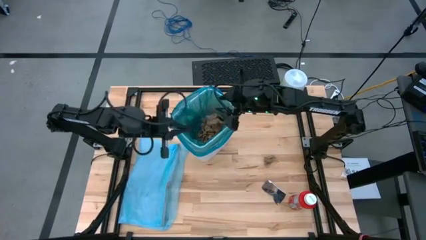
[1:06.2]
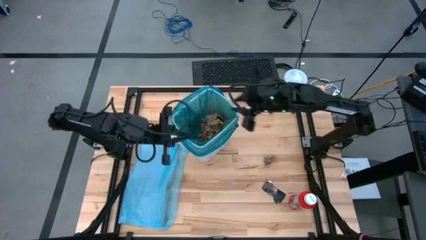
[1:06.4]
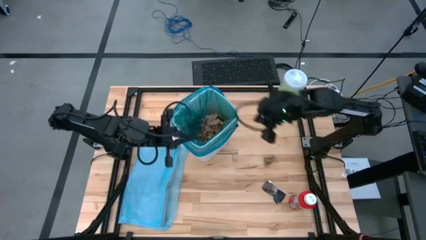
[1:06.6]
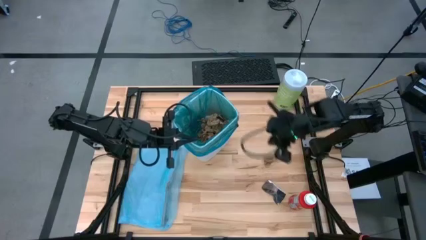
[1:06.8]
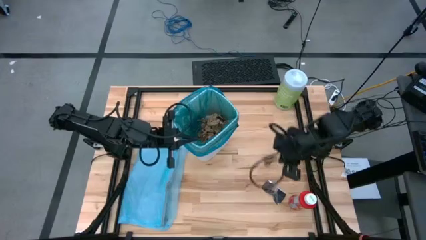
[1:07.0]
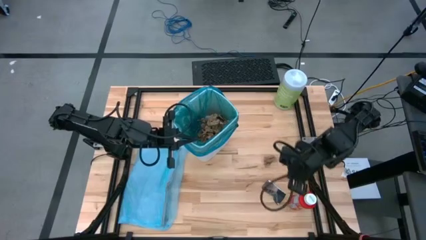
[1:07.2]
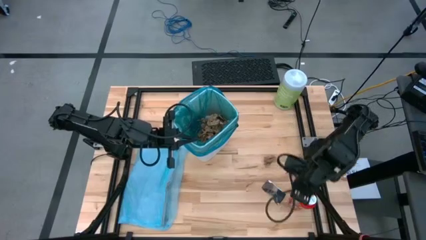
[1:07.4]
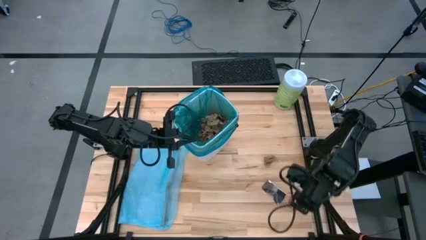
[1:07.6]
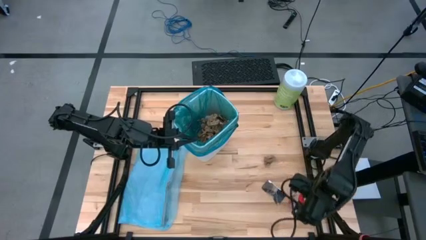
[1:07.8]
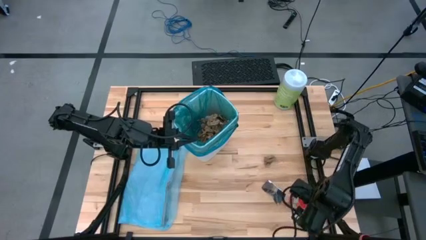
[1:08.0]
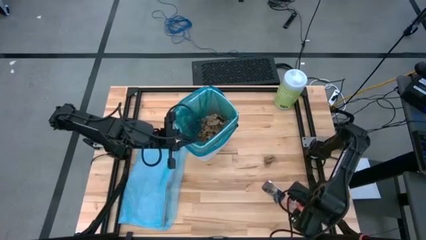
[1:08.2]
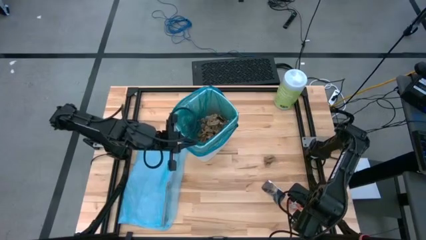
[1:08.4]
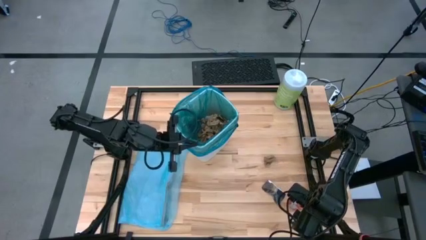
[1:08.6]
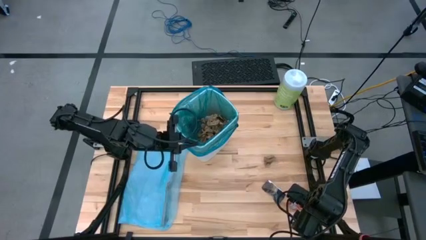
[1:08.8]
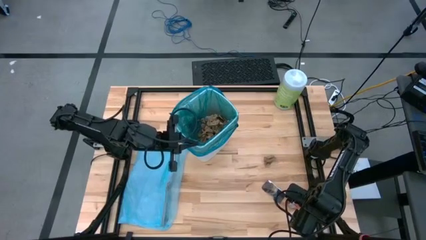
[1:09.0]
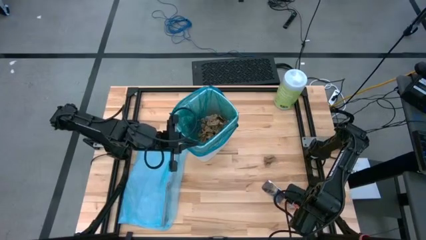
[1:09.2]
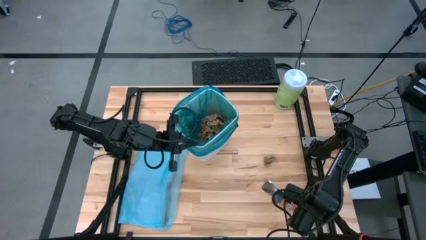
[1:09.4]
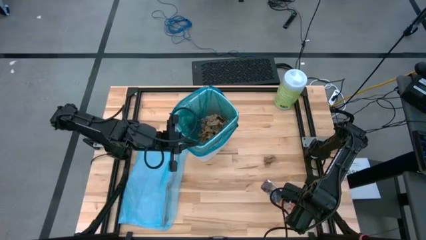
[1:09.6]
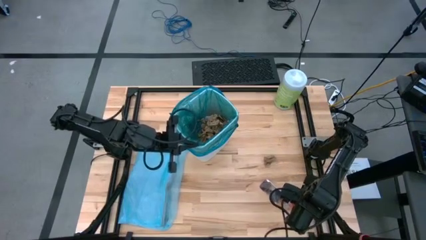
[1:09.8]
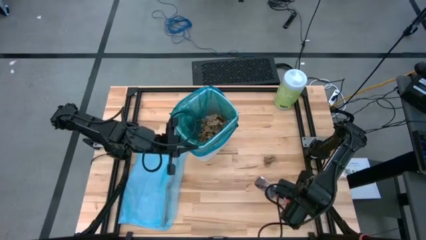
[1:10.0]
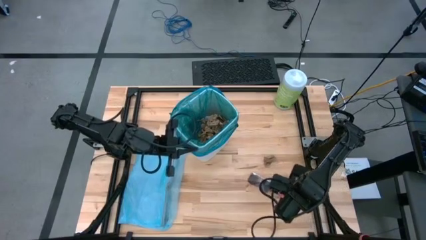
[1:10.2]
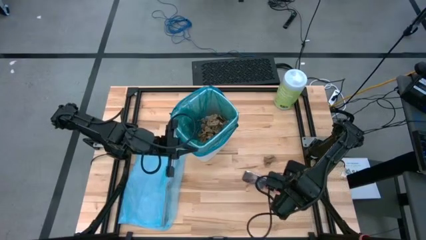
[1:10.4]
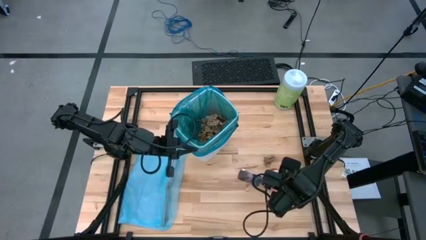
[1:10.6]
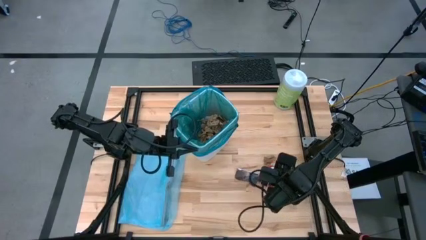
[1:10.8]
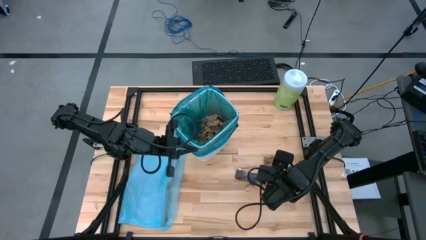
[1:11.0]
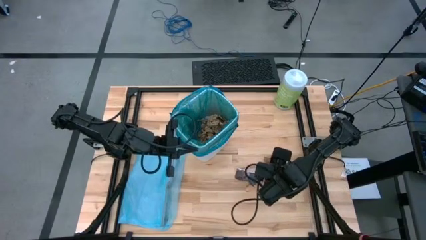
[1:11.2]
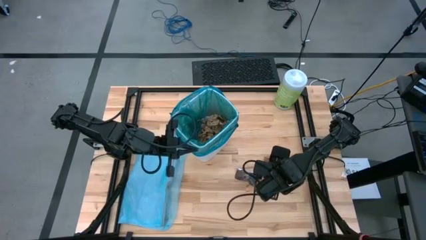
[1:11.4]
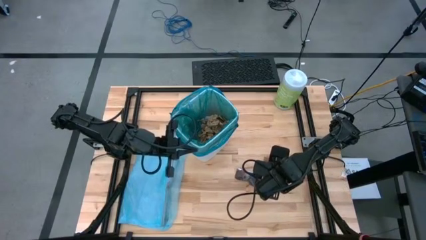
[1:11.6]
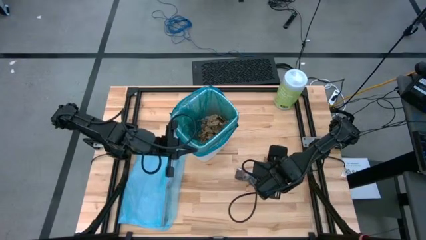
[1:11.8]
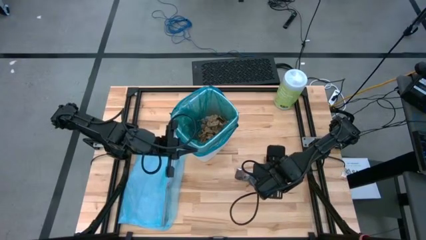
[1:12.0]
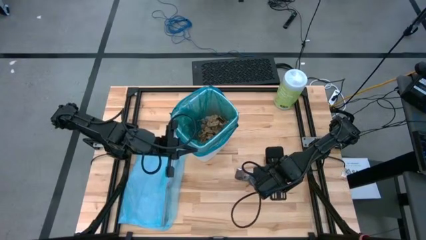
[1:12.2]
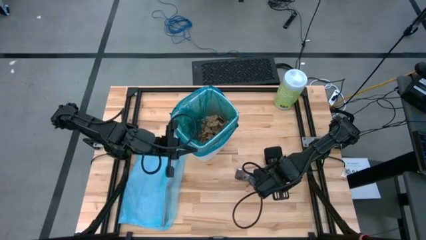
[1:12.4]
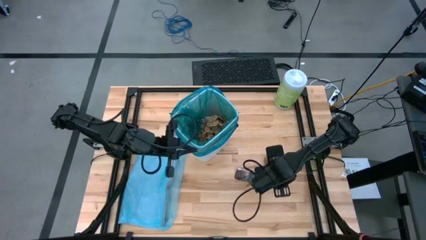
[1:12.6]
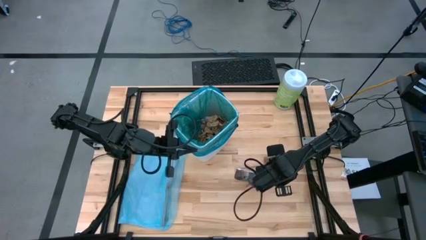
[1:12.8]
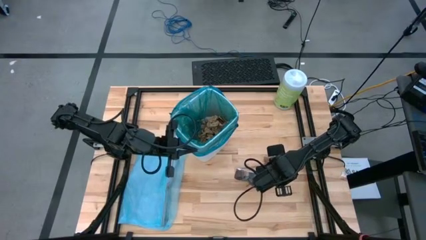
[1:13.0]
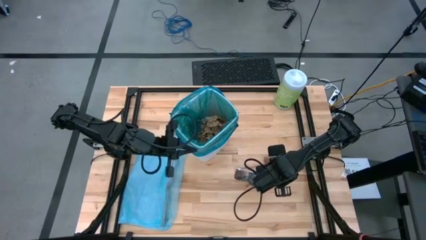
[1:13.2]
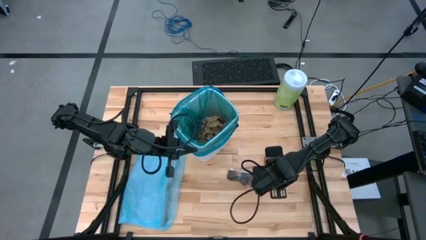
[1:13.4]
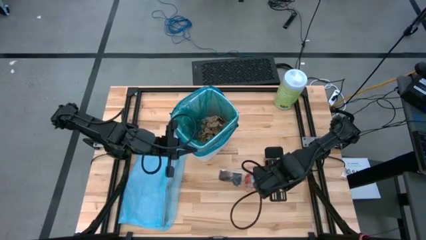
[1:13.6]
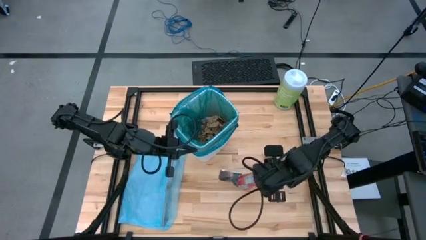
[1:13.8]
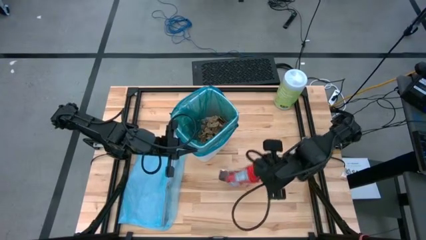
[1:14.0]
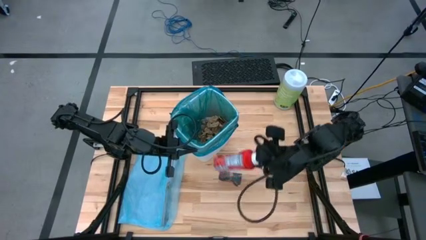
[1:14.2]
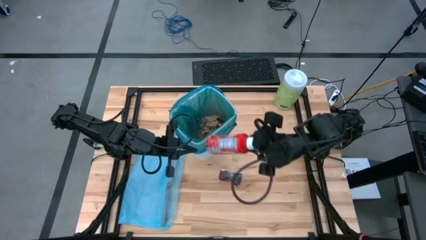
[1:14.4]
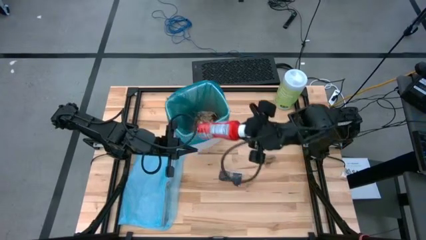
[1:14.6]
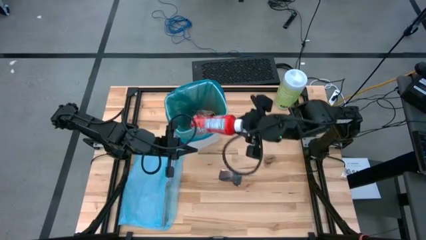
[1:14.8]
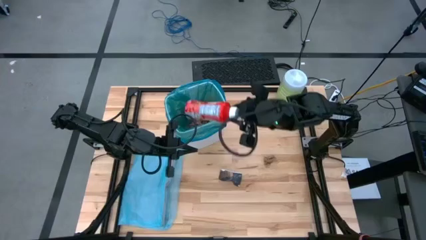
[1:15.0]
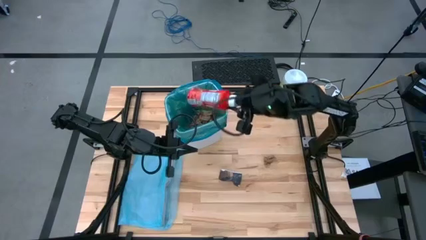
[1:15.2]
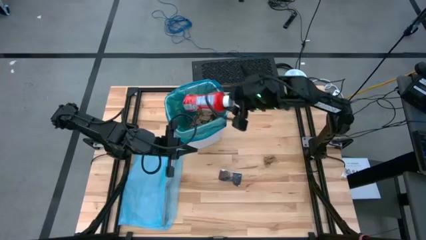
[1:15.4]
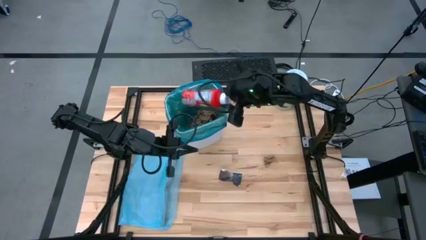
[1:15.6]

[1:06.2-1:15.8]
Task: place trash/remove bag and relplace
Put the red plastic bottle into the blue trash bag inside the white trash bin

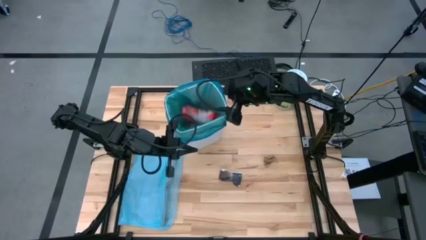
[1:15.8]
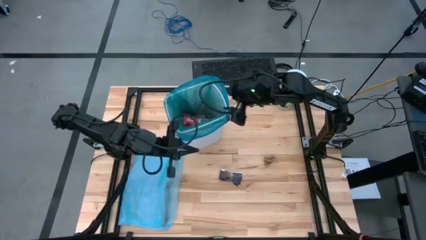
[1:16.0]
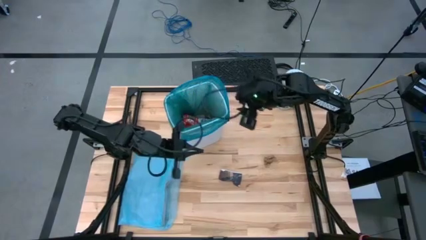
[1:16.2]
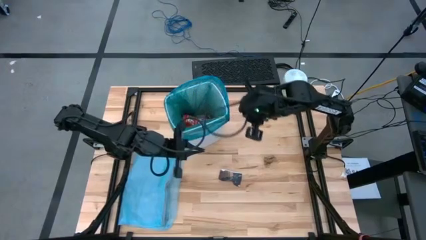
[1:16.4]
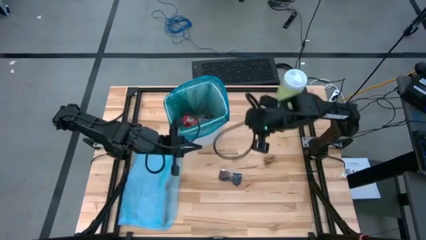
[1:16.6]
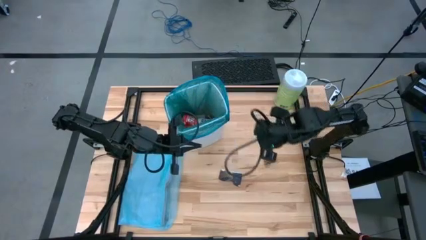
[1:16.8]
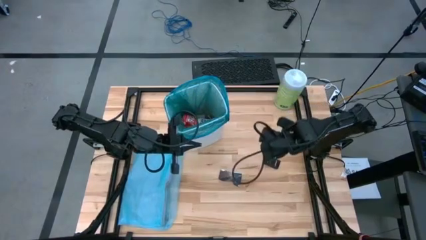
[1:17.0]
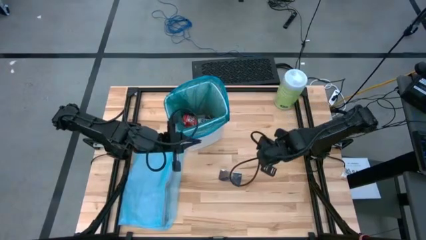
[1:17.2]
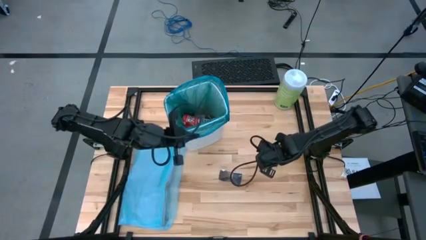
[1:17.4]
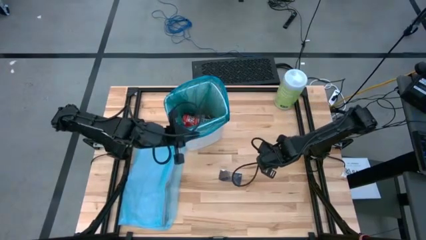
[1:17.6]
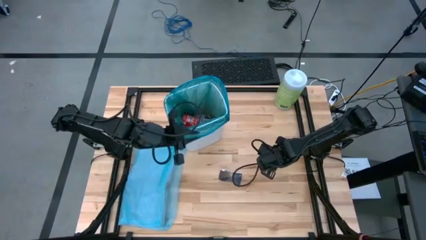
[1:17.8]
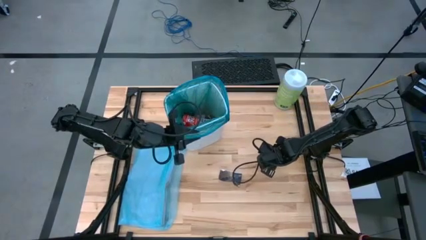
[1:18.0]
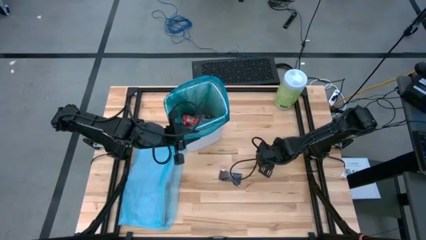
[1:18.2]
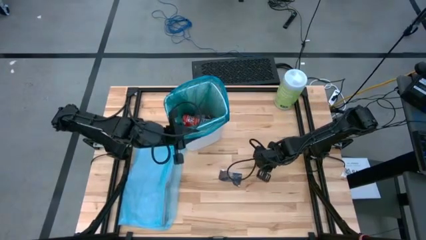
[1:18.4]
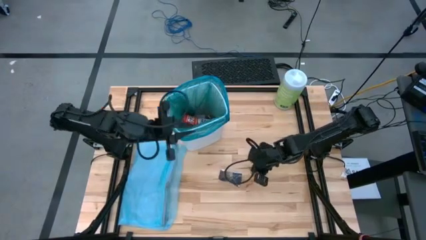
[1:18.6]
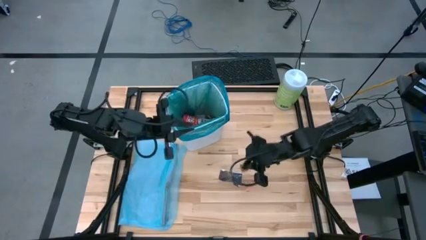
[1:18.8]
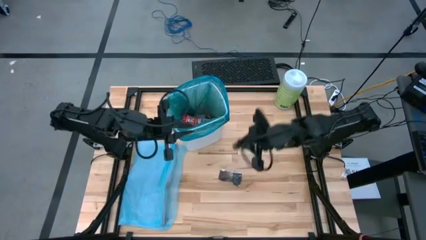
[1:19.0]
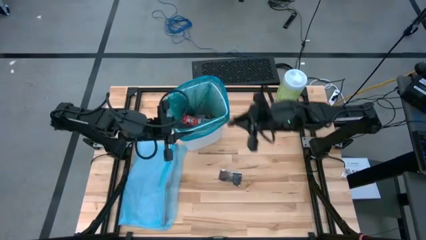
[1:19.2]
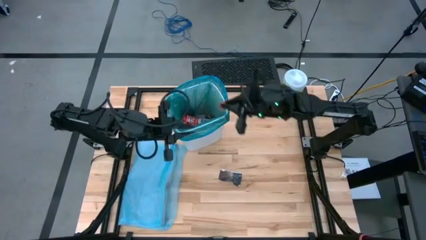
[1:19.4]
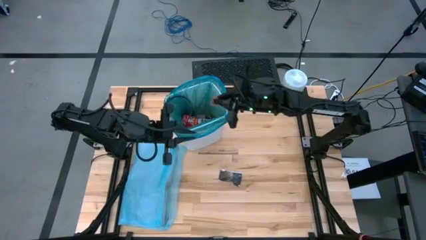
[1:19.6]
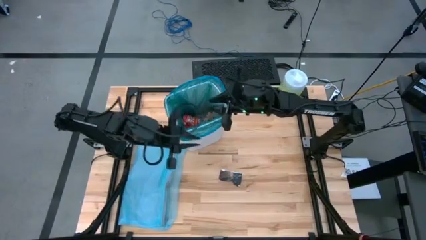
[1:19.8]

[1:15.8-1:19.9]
Put the brown paper into the blue trash bag inside the white trash bin

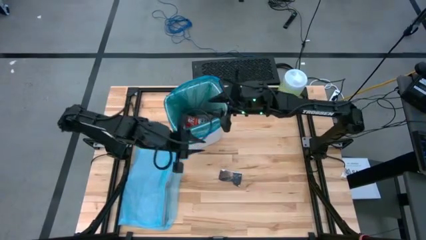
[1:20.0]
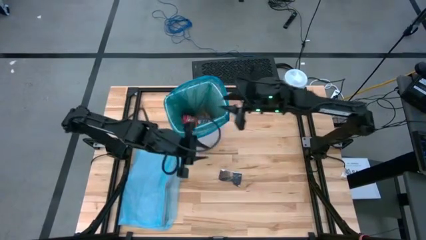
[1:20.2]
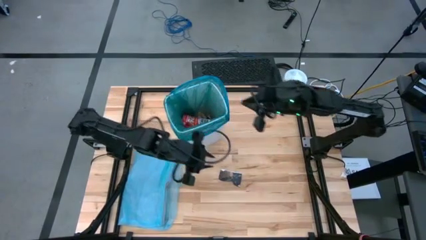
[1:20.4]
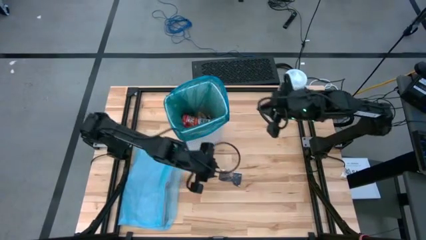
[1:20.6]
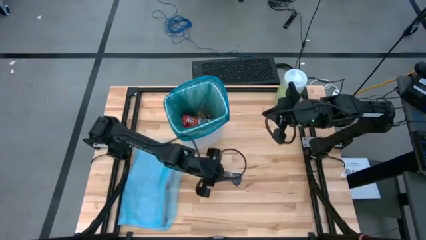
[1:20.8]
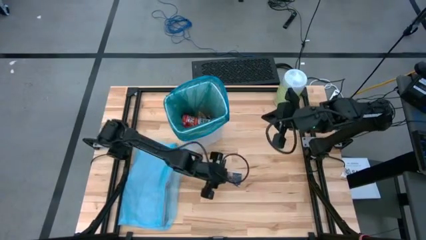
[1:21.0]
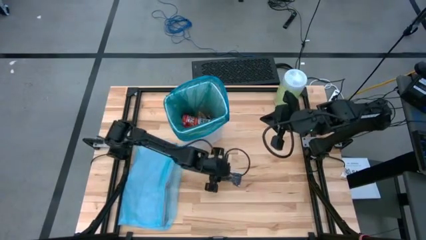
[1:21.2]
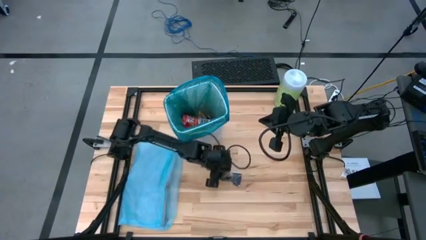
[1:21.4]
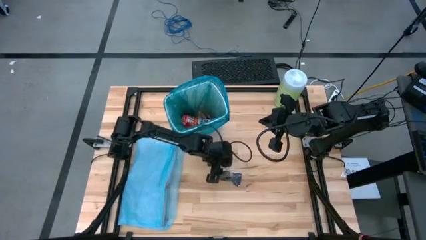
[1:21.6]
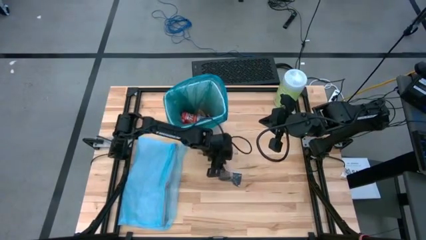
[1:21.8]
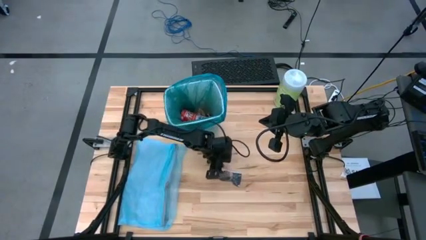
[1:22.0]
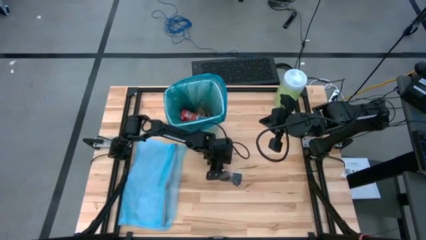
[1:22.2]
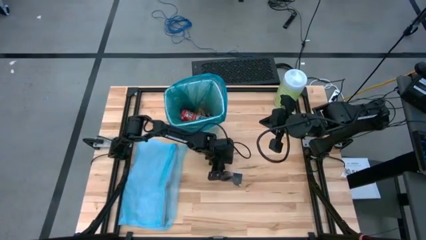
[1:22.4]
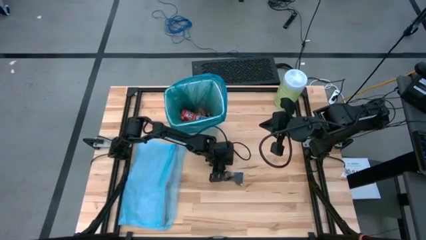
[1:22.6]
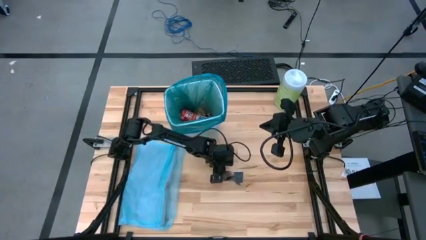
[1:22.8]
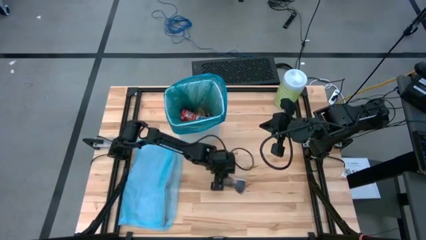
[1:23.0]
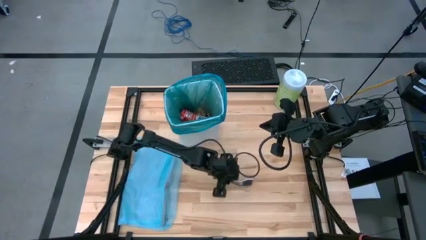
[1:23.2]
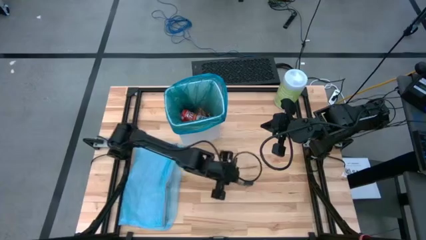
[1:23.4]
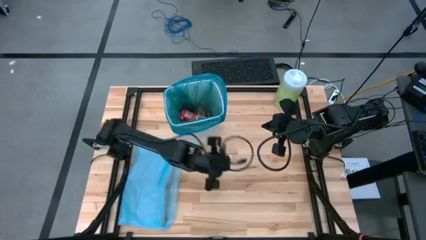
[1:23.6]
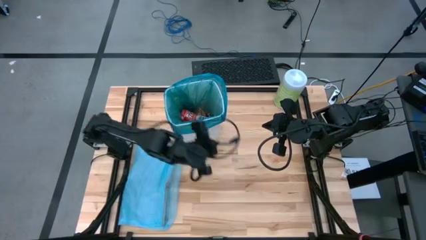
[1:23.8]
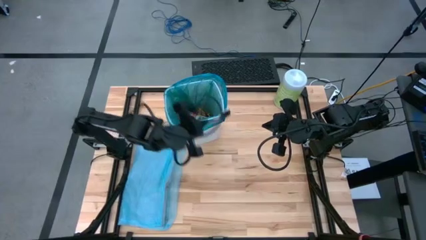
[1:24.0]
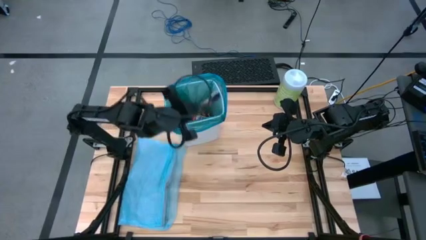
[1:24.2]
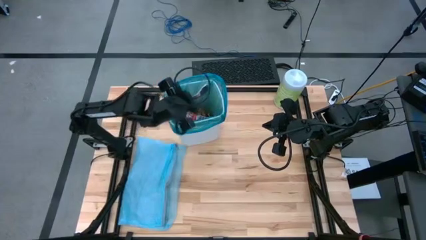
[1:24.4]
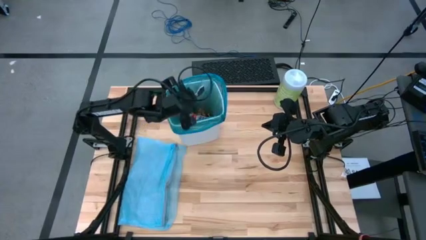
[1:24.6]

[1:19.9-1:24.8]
Put the brown paper into the blue trash bag inside the white trash bin
